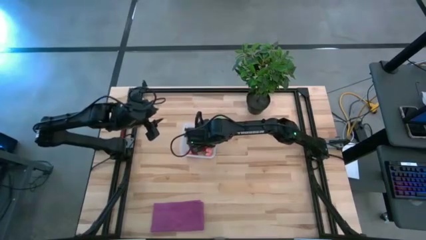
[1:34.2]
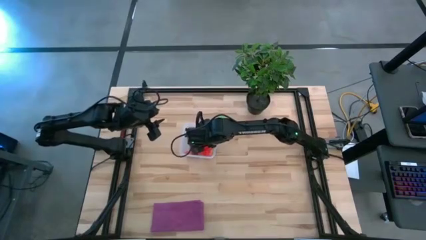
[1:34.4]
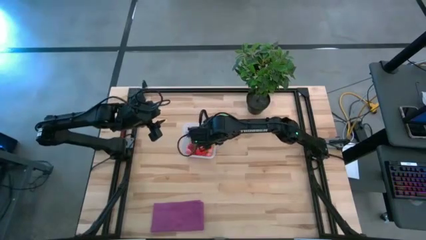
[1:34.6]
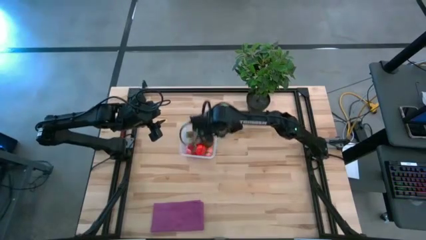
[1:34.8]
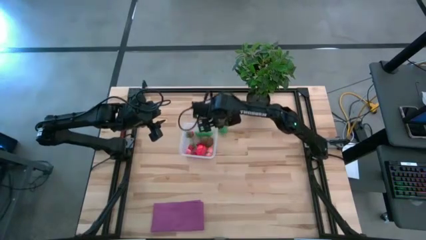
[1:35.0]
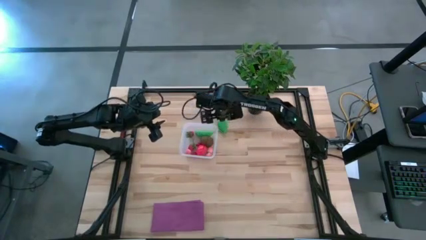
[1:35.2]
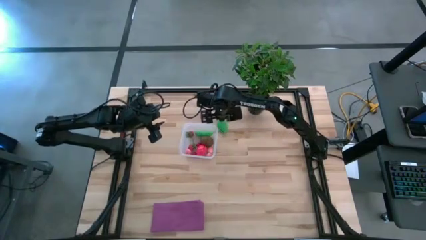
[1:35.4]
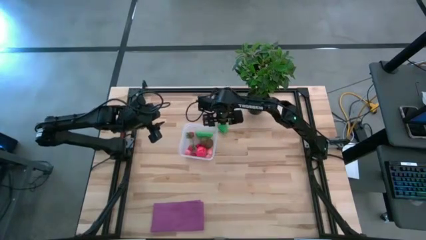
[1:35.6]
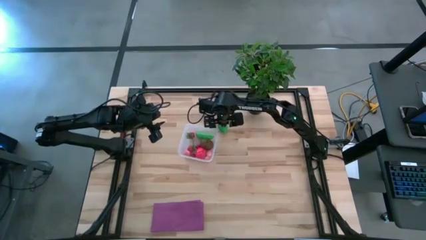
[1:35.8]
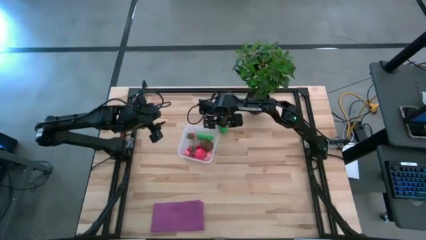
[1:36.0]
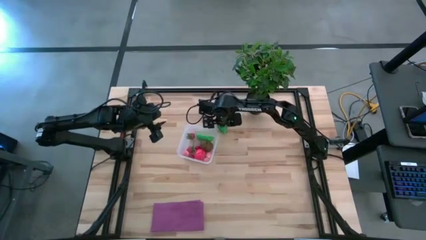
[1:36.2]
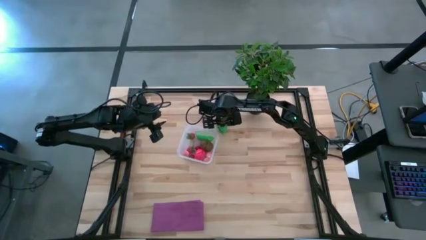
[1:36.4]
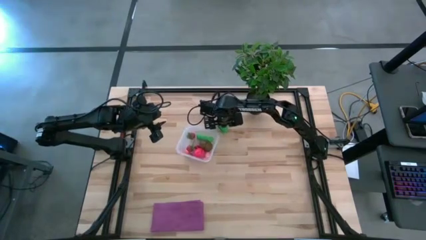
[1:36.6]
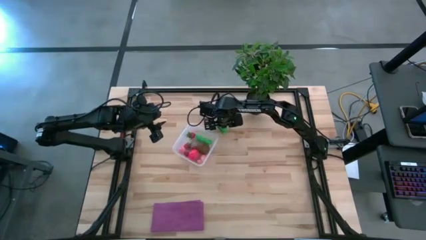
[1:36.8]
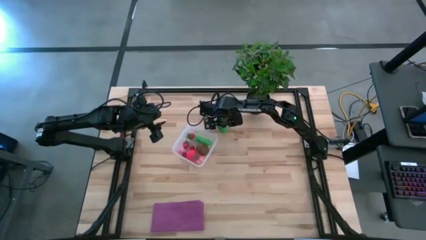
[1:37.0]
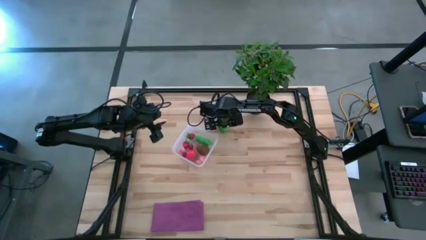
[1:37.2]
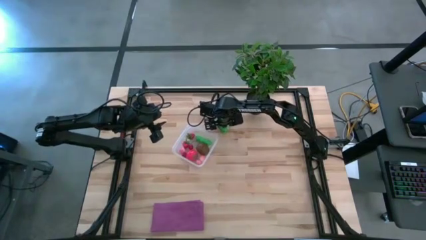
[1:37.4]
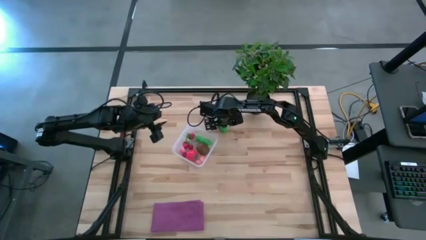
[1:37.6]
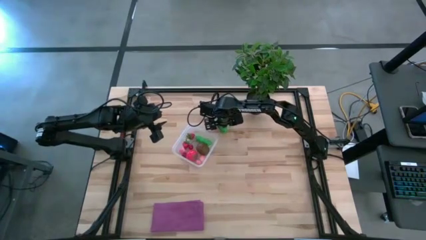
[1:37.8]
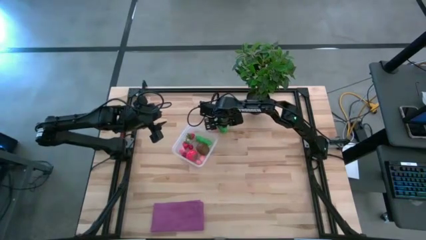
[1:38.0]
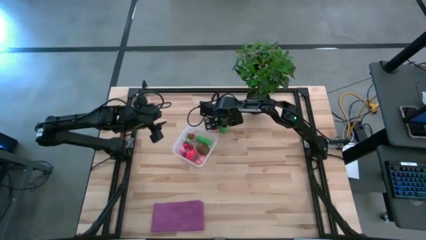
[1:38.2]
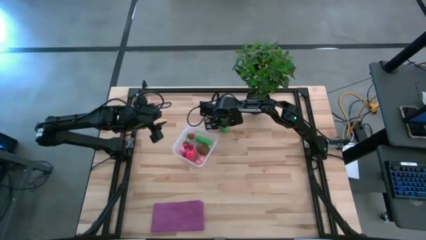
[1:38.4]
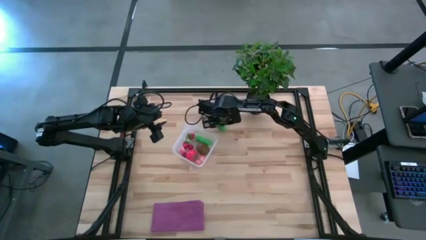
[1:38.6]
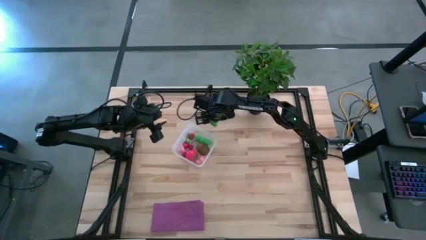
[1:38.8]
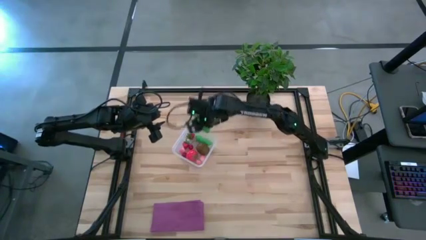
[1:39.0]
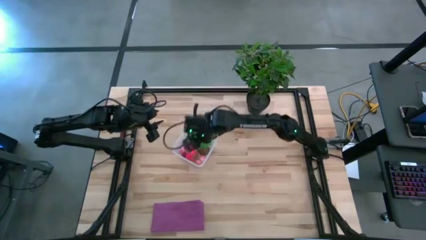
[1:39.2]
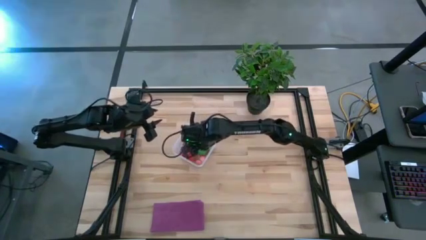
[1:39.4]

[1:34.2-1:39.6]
Task: Pick and placing Produce into tupperware
Put the green corn into the transparent container

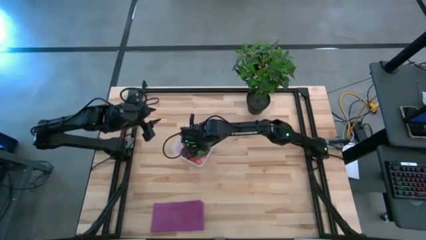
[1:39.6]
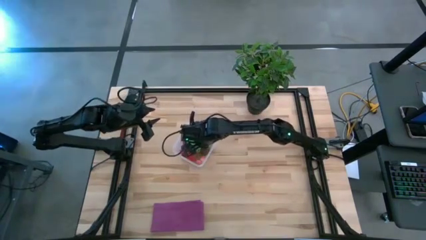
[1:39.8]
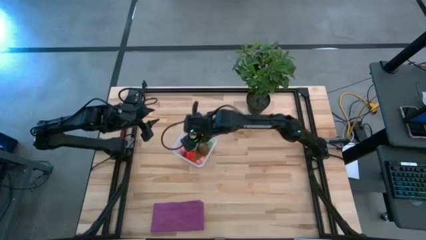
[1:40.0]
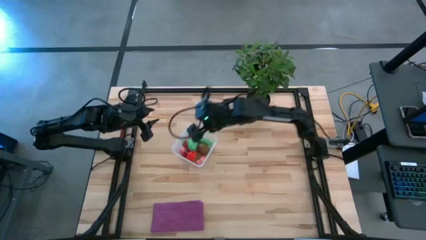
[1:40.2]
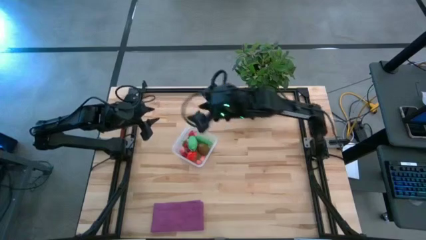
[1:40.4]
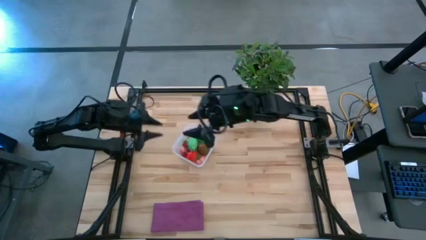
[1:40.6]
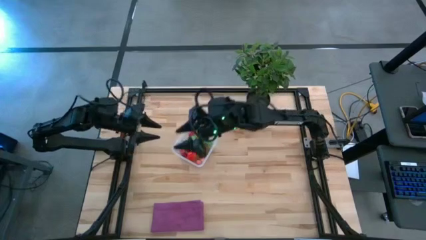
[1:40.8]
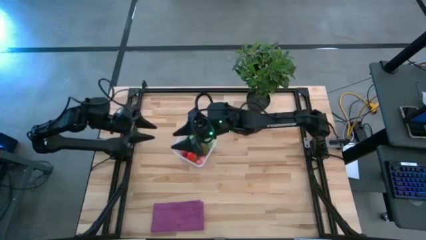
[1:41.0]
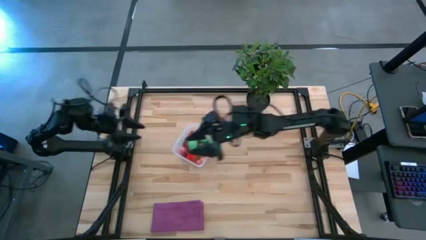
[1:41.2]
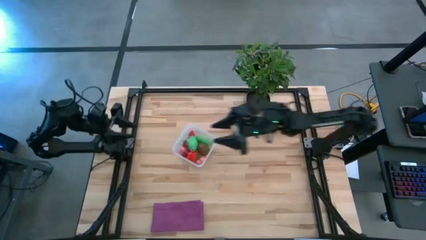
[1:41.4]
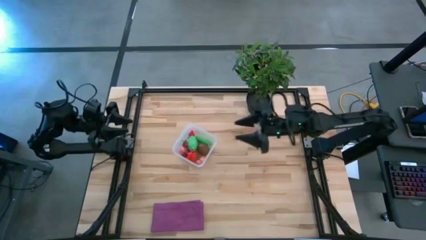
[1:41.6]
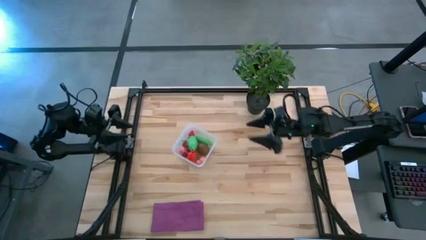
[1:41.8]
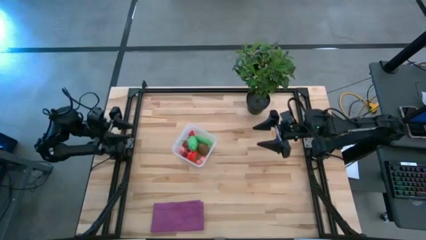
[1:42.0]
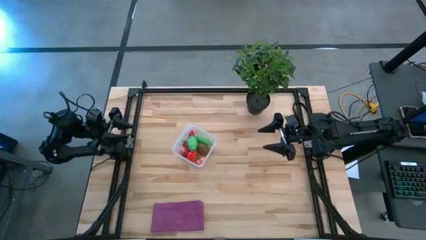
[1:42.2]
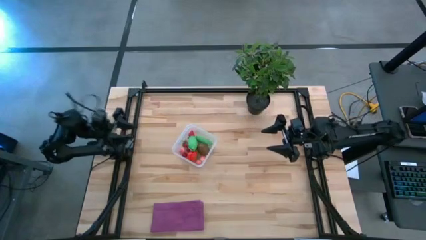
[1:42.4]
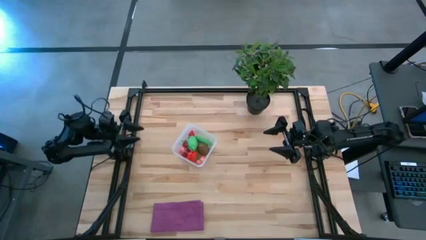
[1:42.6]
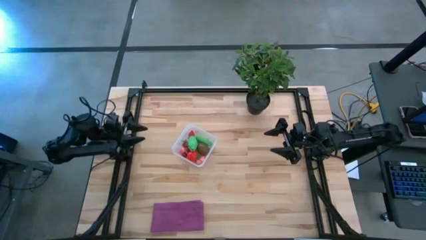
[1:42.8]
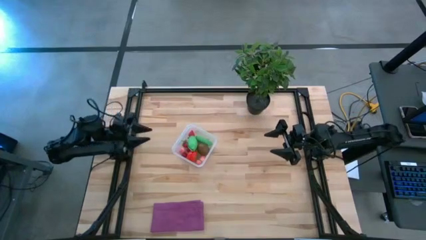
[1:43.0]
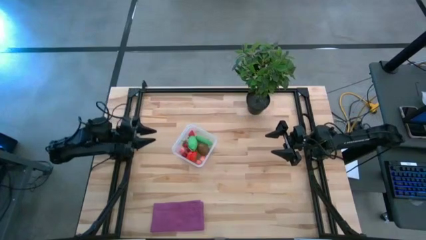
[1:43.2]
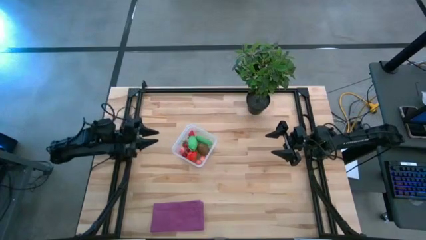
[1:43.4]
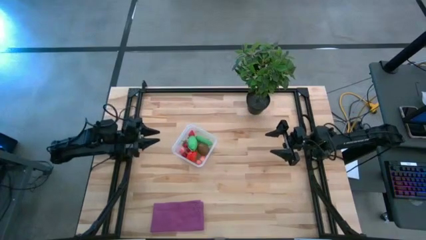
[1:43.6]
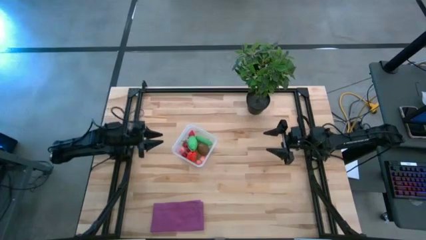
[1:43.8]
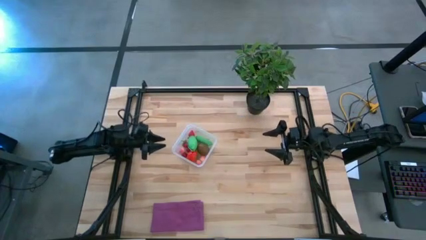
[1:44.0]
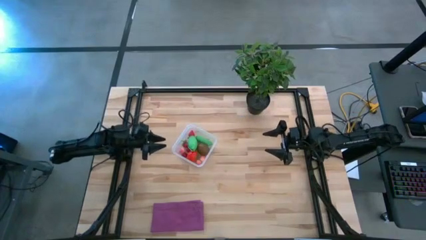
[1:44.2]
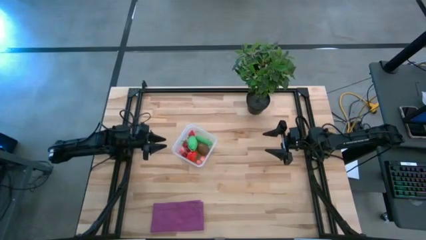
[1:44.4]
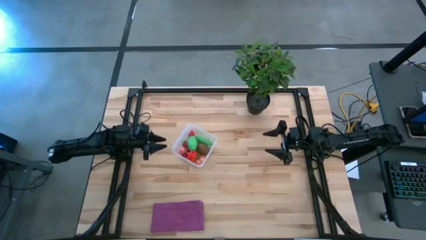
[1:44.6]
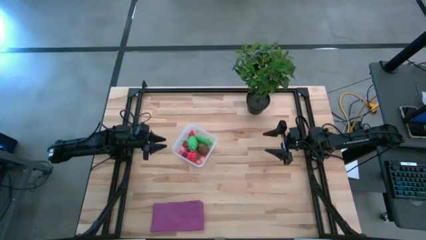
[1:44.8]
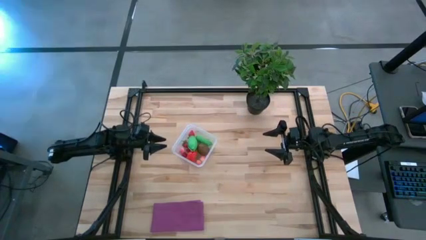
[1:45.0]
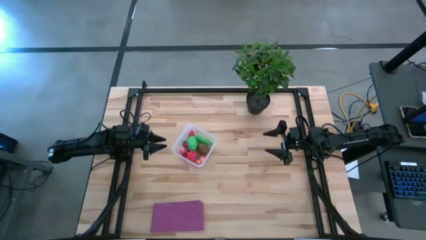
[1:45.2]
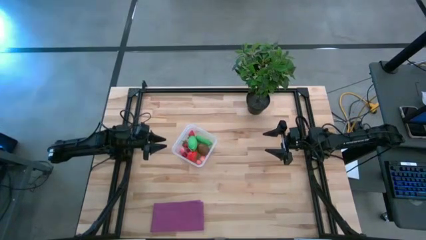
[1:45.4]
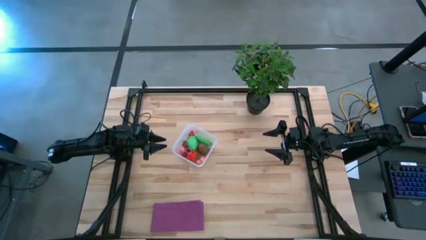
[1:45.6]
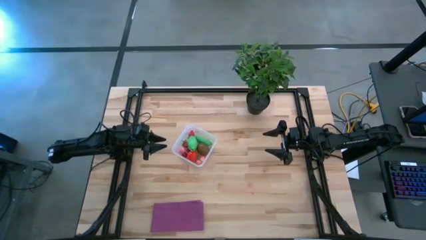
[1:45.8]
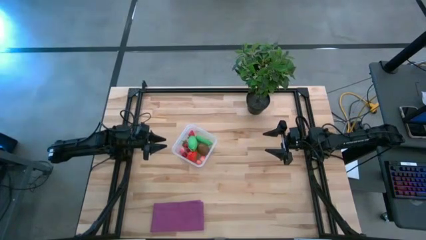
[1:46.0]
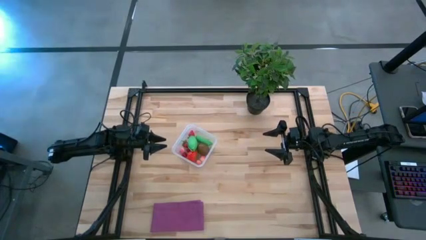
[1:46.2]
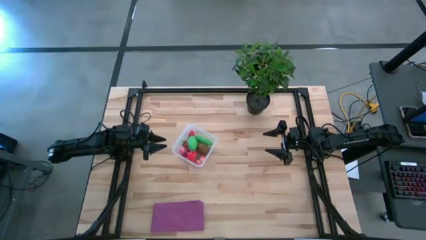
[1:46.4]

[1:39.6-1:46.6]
Return to Home Position

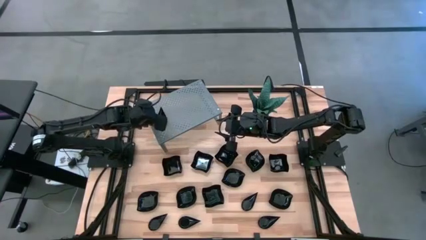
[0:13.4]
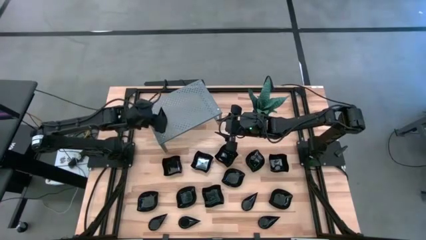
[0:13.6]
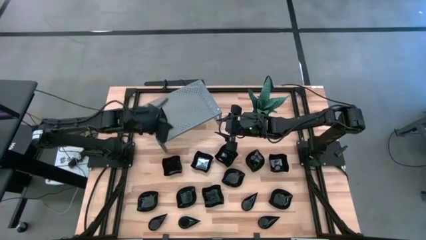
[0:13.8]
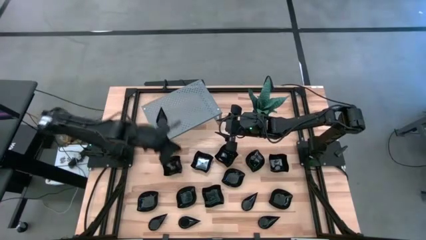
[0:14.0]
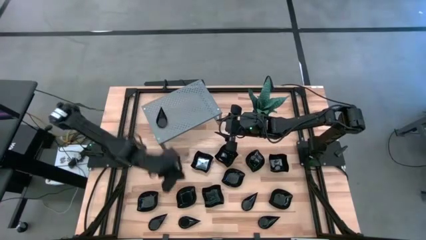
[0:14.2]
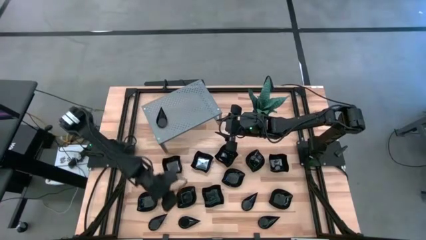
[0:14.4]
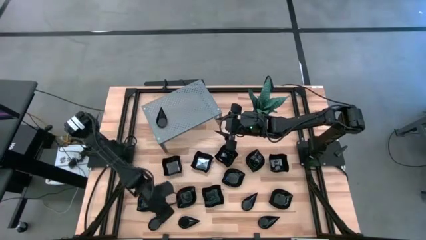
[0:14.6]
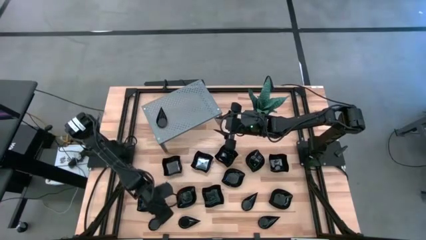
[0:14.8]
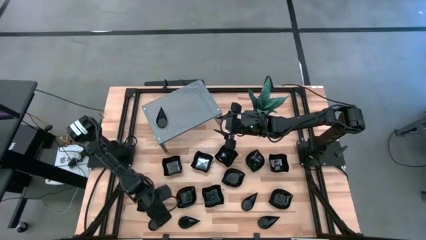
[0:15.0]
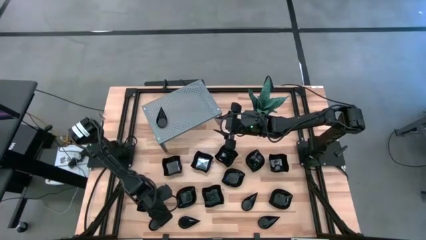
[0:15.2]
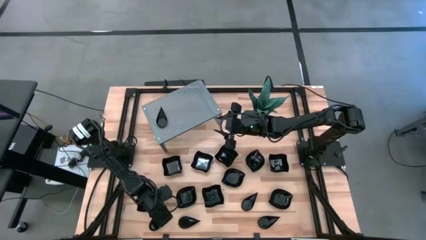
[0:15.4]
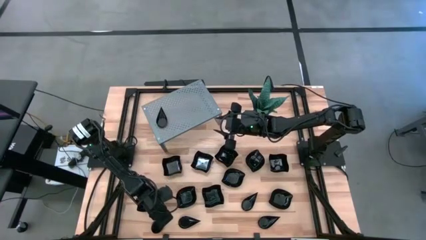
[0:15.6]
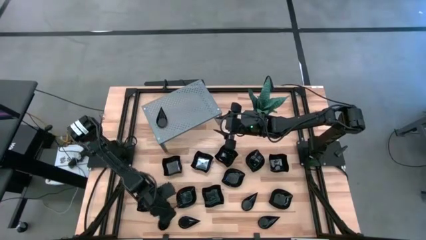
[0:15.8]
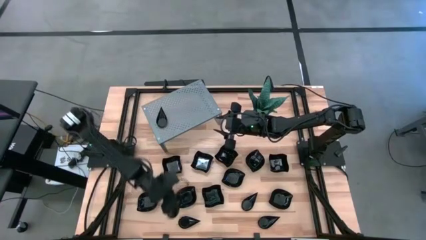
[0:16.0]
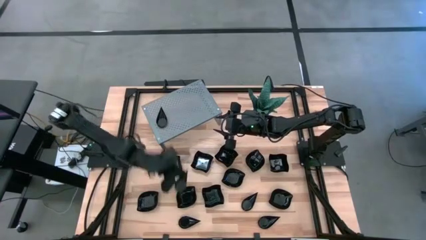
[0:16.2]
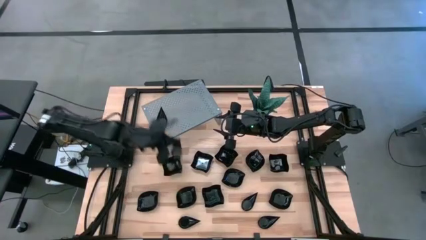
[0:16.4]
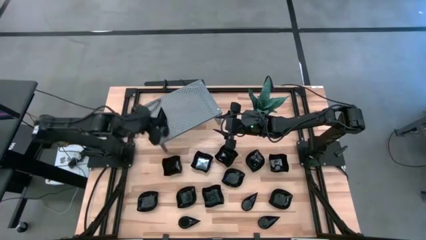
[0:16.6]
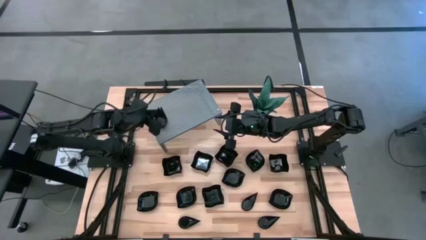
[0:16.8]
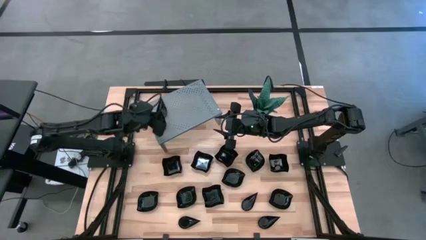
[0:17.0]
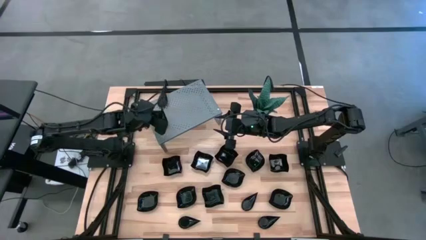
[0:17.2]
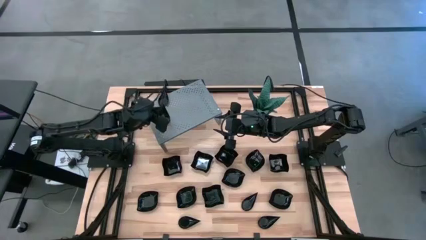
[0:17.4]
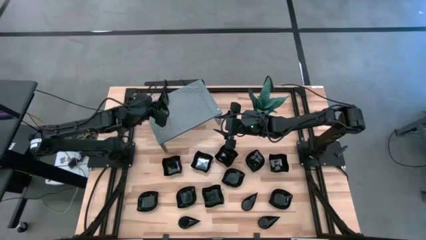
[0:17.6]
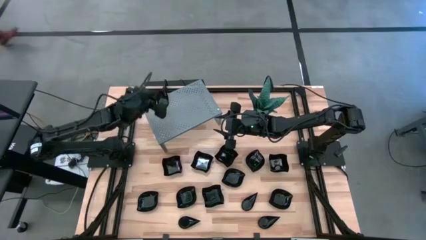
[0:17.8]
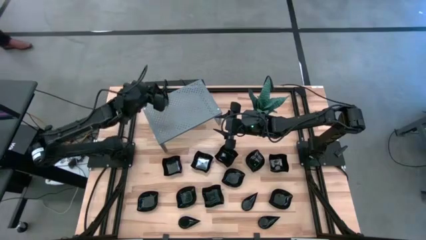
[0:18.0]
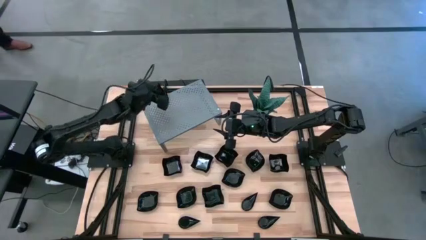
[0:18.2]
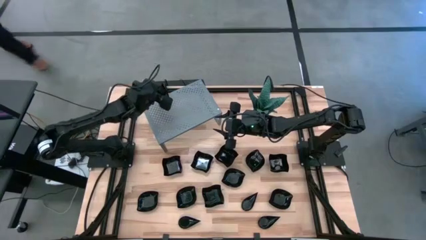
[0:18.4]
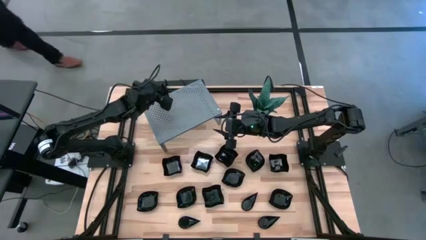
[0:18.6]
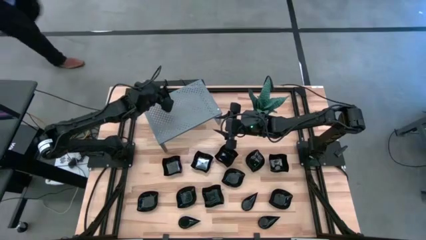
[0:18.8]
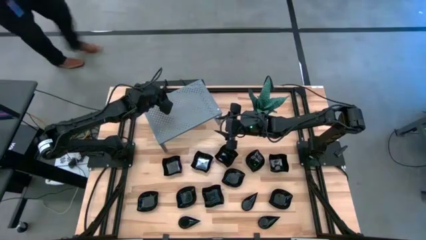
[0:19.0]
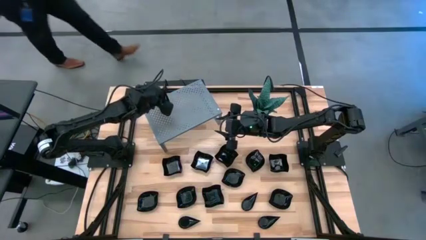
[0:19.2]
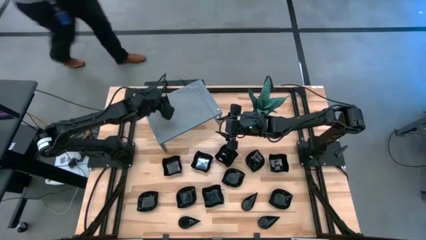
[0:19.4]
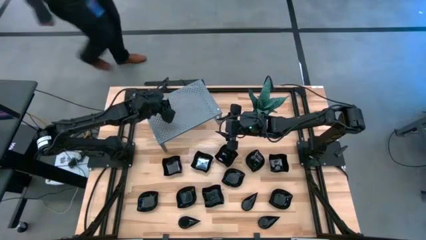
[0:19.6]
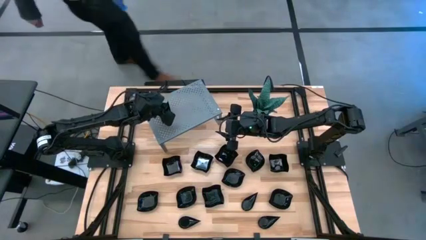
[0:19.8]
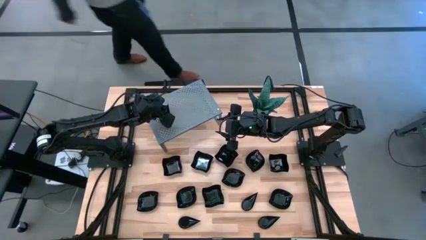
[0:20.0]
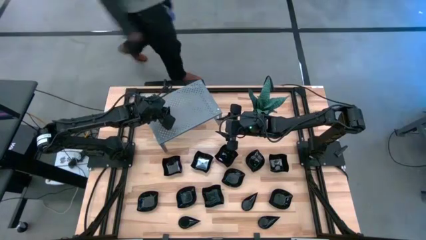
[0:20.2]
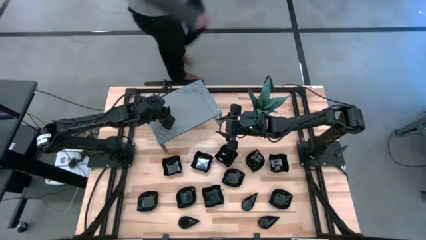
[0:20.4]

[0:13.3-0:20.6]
Task: Pick & Place Mini shaped plates
Stack the black drop-shaped plate on the black drop-shaped plate on the shelf
